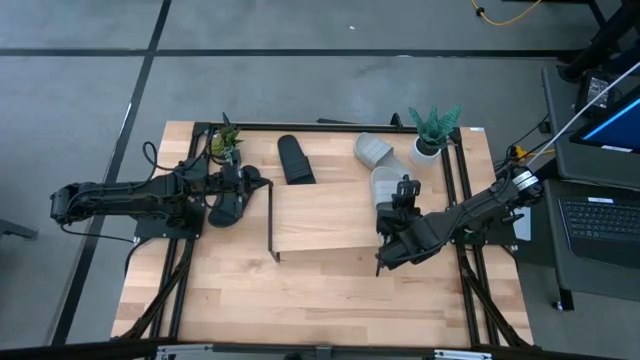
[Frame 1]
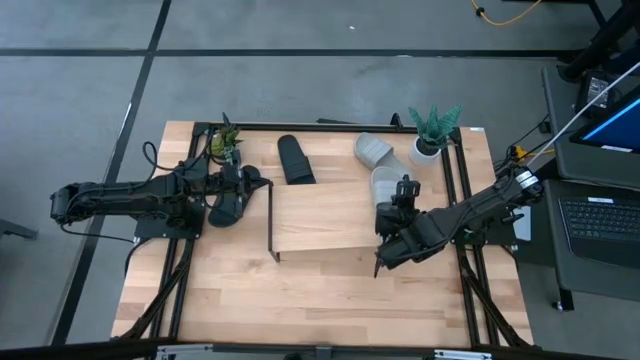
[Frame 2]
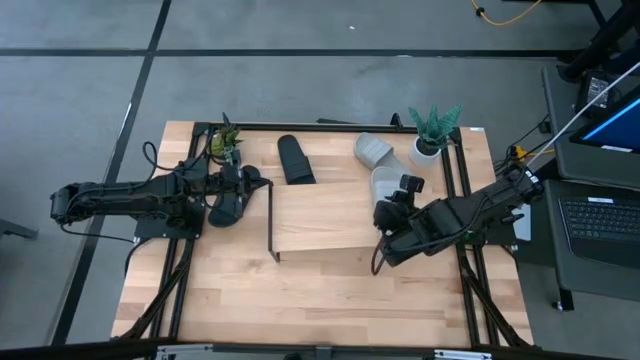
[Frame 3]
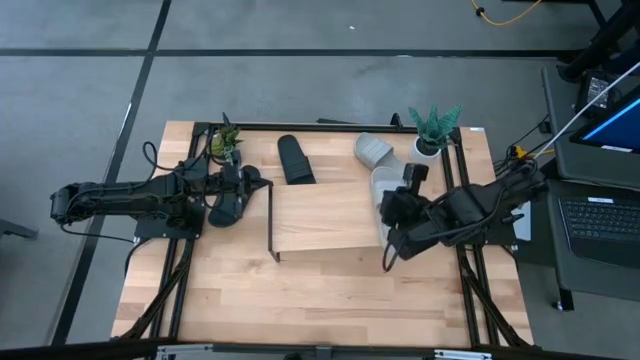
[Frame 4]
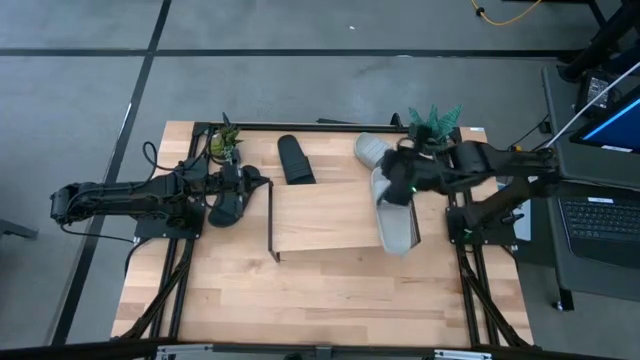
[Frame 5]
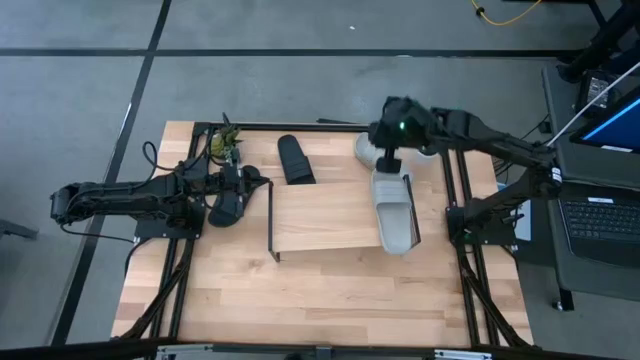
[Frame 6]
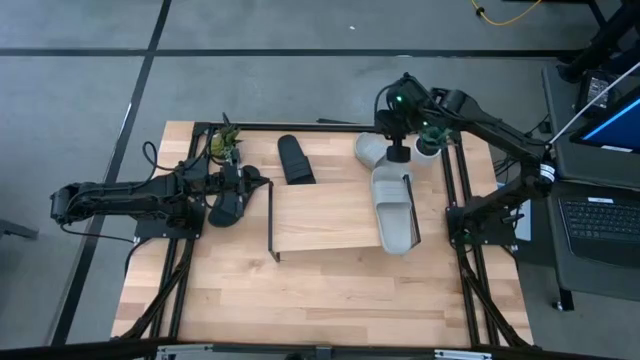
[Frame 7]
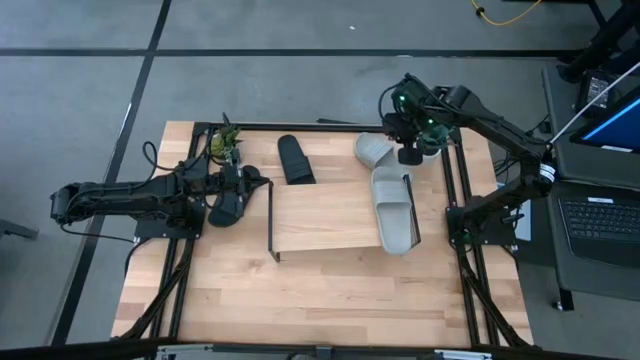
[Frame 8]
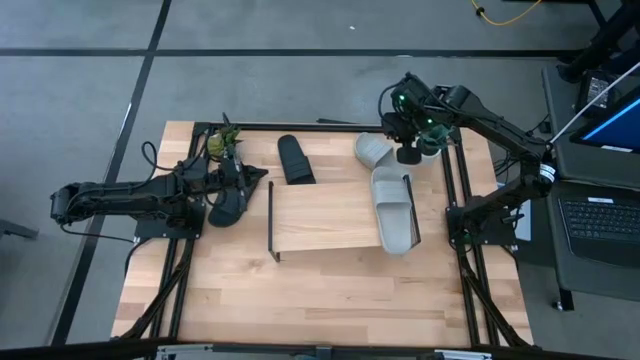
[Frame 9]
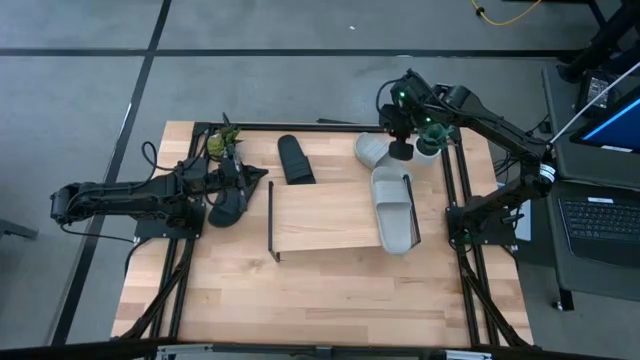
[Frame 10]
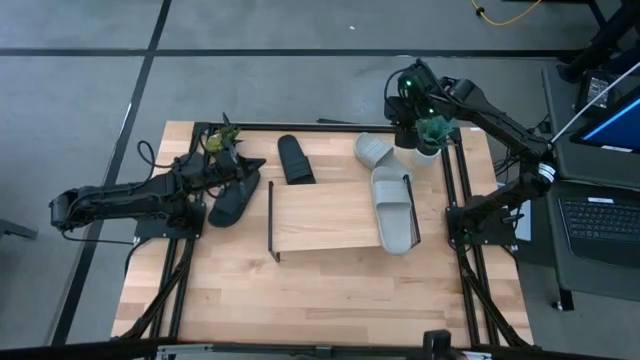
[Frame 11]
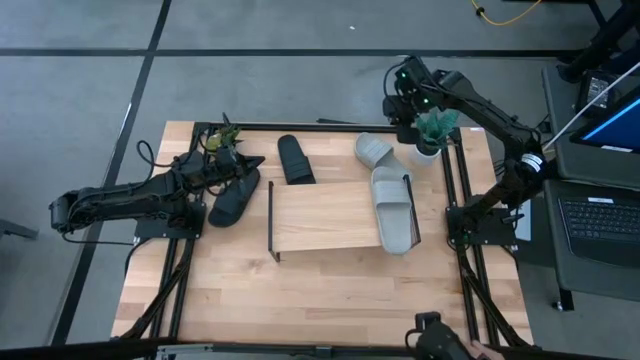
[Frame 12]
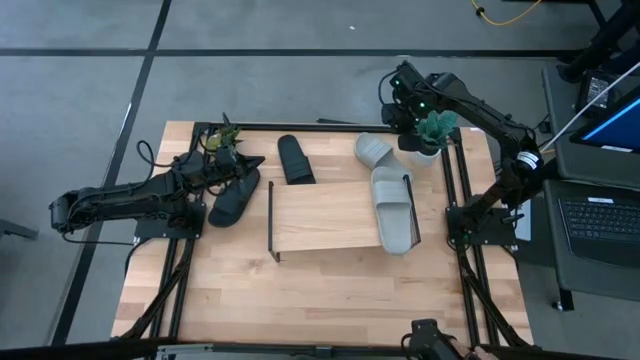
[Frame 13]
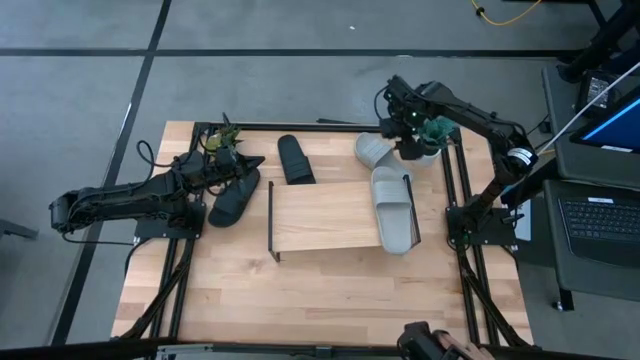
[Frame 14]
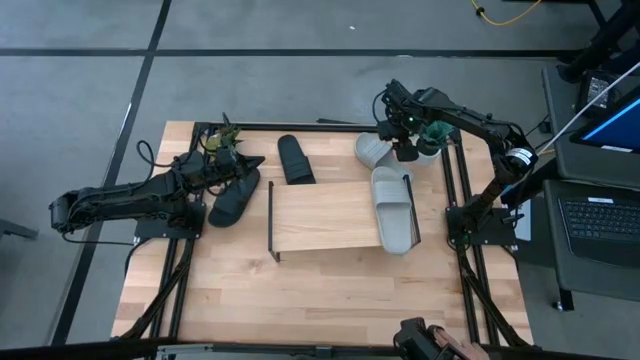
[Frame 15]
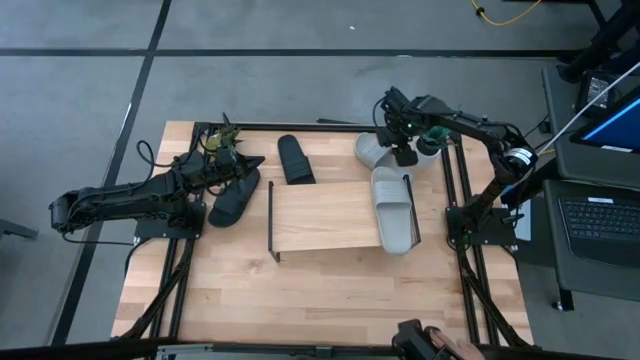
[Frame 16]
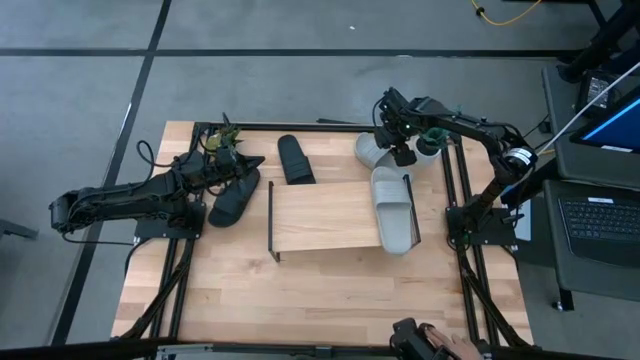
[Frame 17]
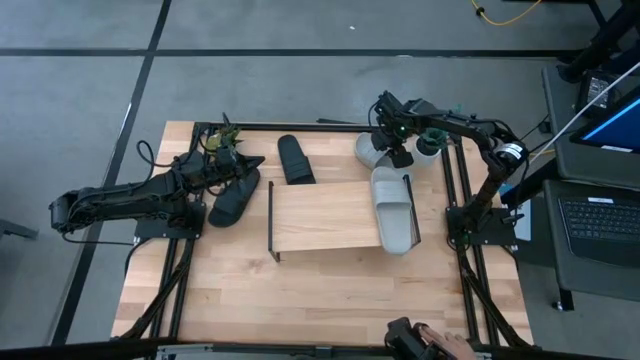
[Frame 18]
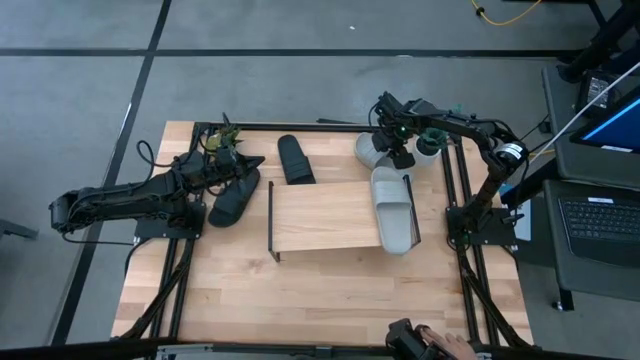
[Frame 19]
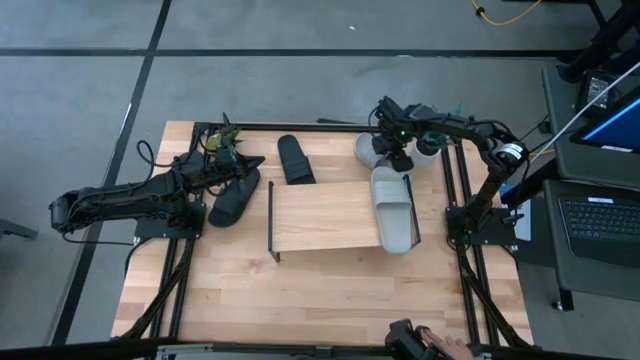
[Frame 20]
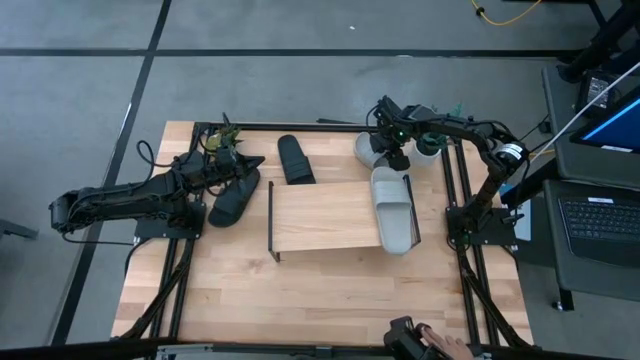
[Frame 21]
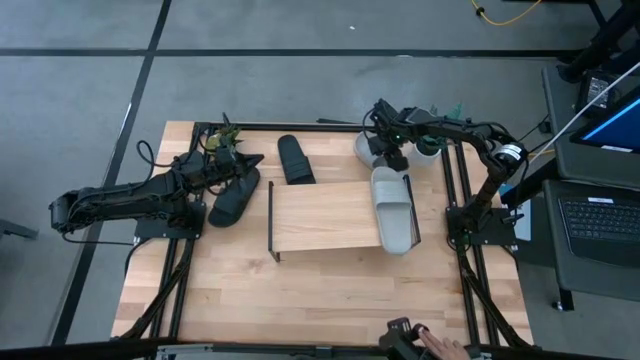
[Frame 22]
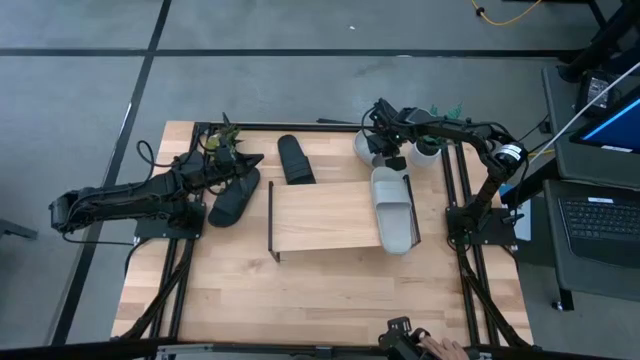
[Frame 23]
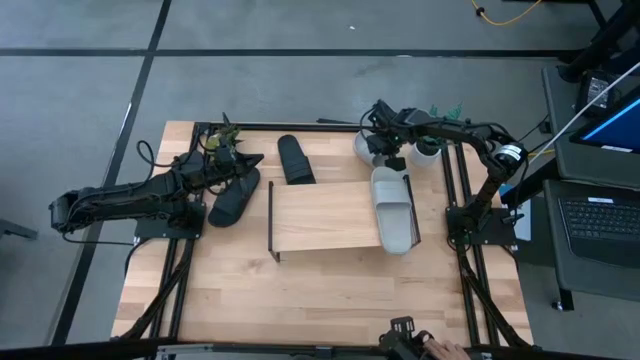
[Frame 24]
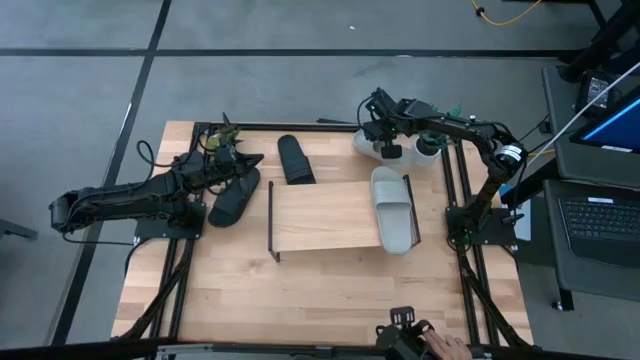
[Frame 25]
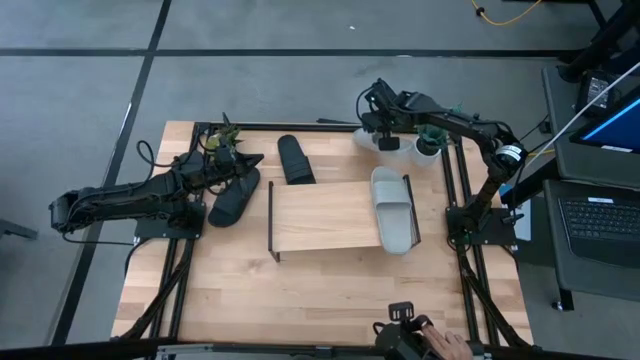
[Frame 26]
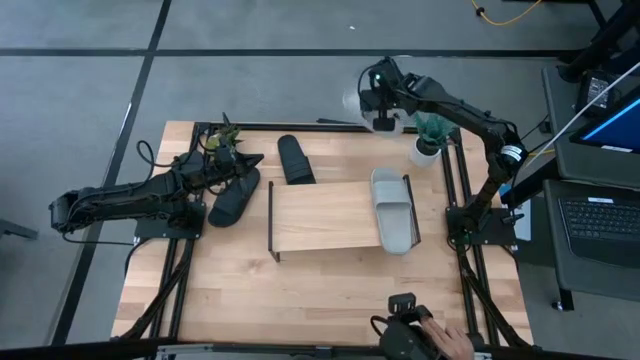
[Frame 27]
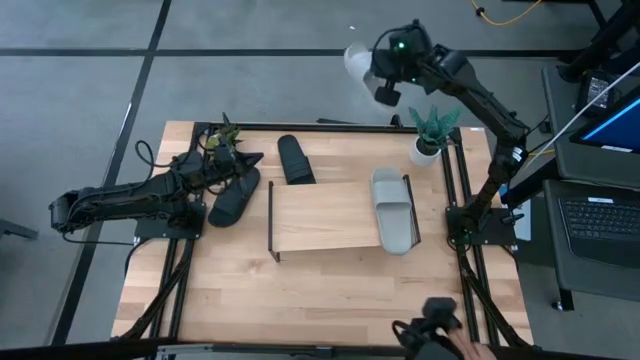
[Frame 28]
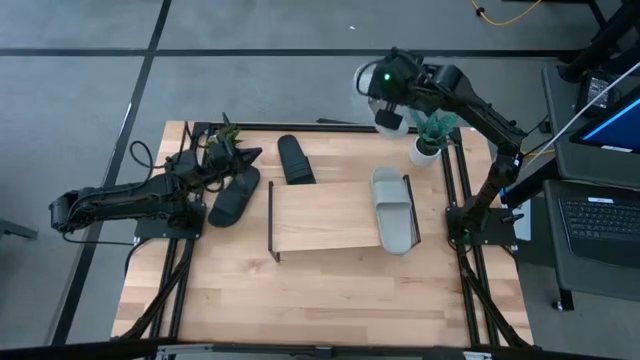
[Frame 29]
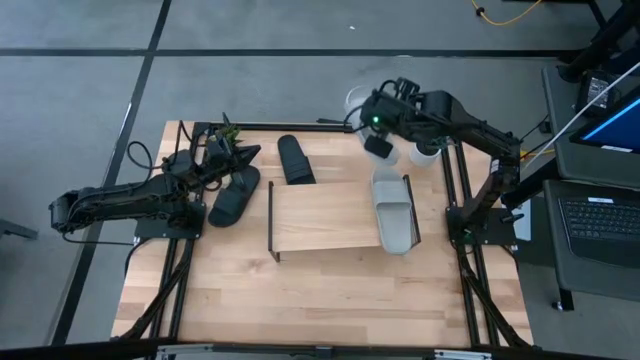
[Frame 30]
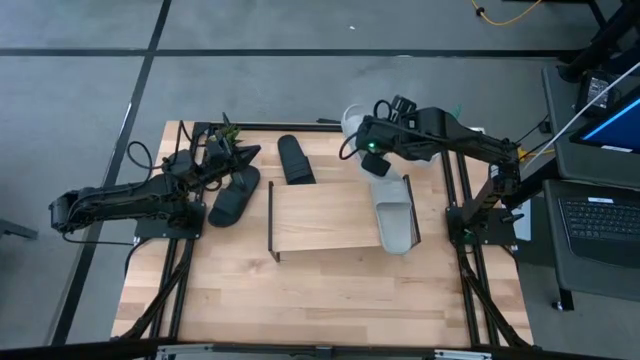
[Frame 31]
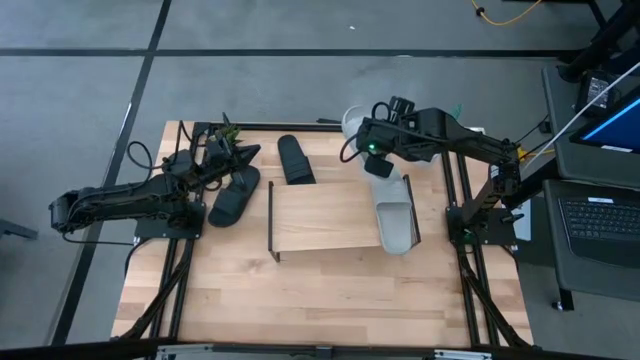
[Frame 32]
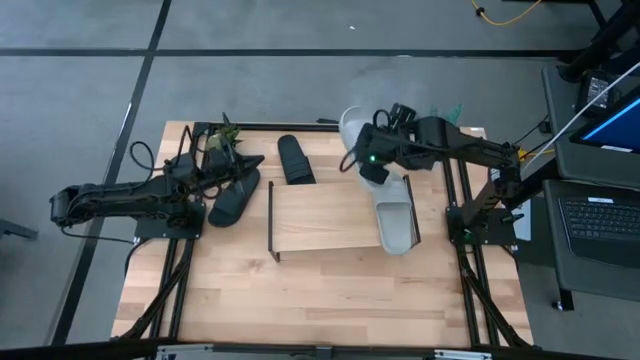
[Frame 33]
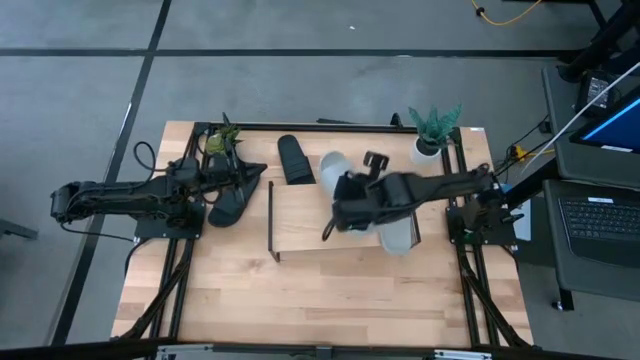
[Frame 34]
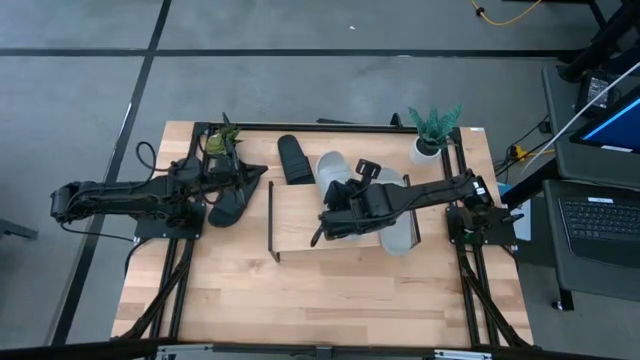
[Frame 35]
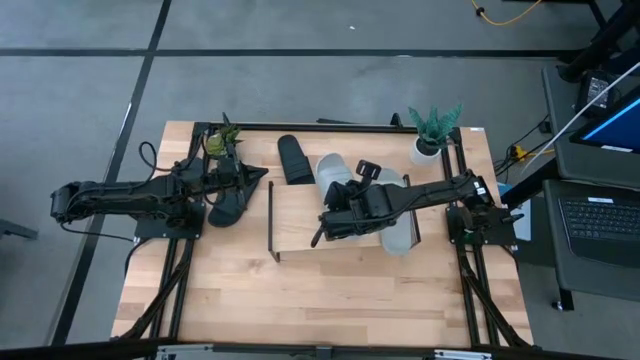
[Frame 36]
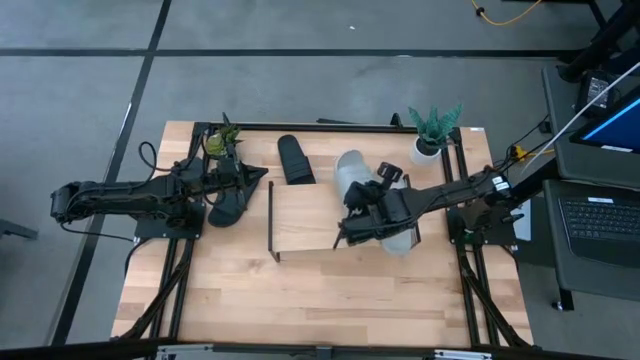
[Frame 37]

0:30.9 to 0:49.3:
Task: Pick and place slides into the shelf
Put the top gray slide on the shelf

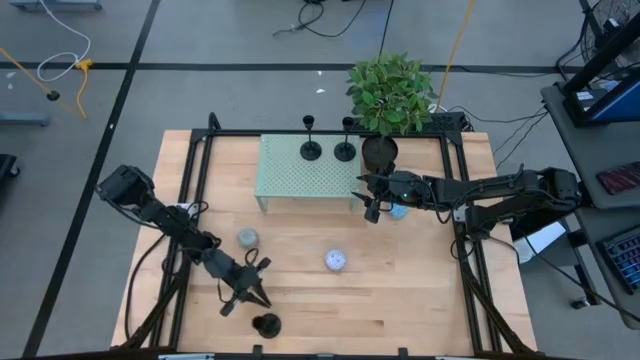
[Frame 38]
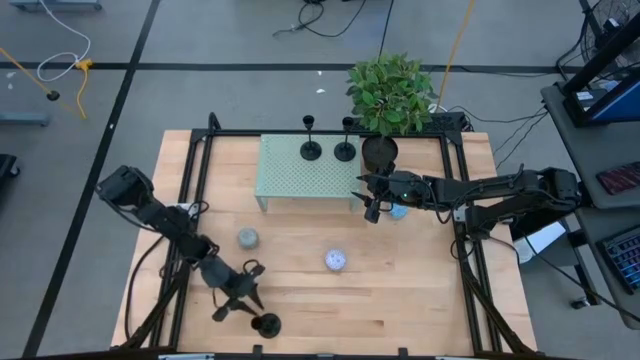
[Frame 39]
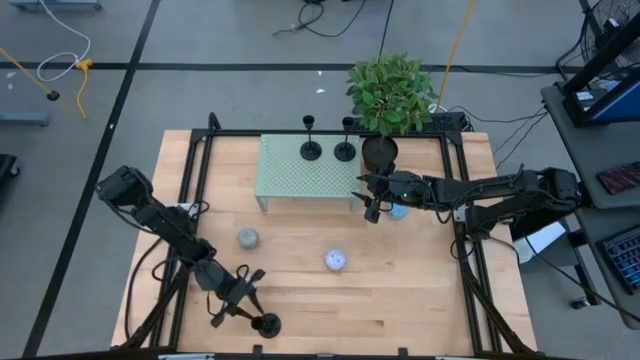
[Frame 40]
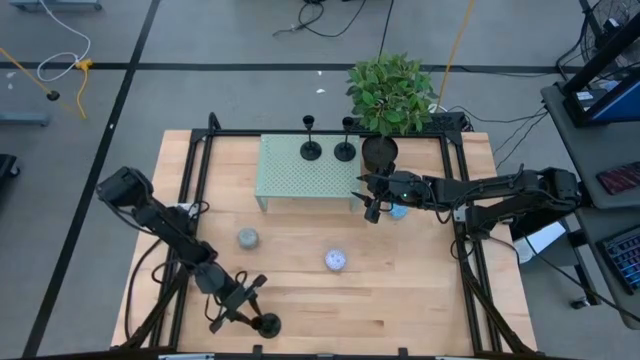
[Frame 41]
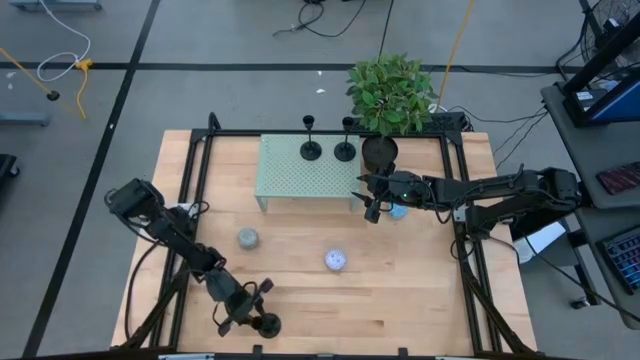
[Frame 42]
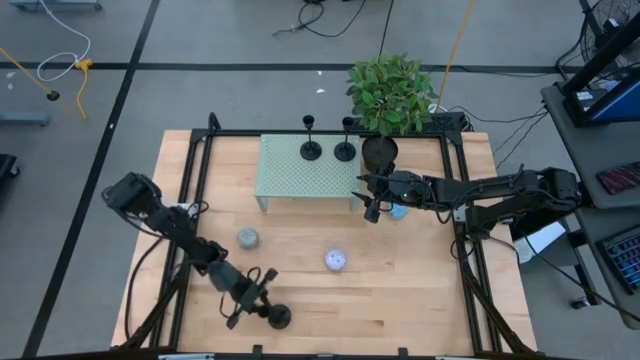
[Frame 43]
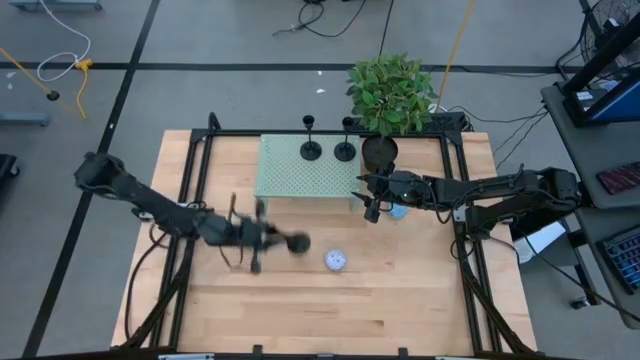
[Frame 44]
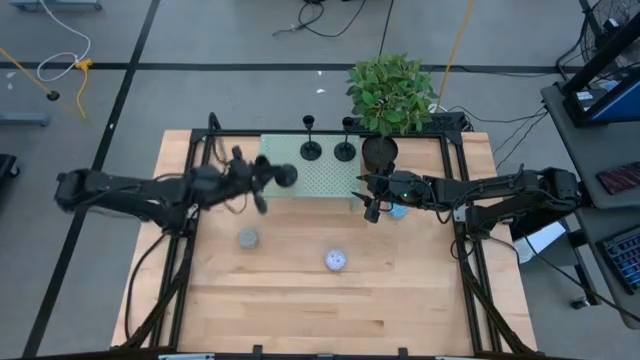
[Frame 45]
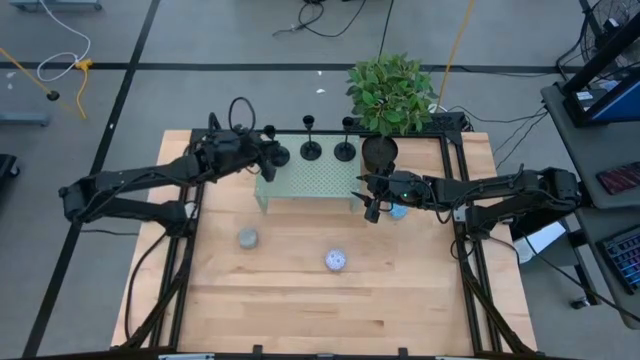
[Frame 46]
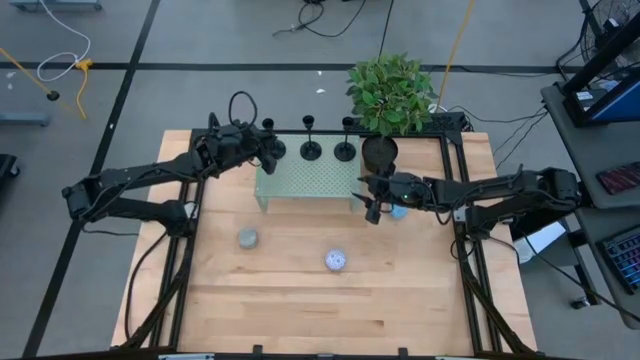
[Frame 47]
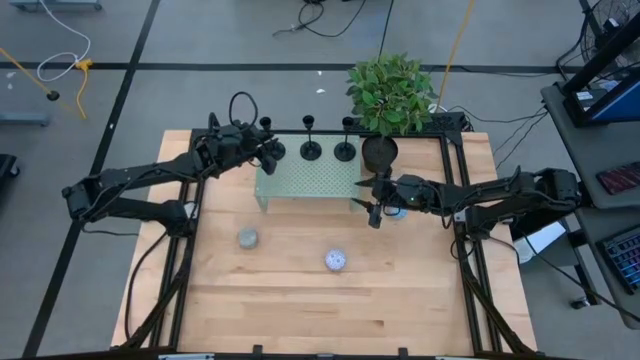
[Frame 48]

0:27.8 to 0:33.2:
Task: Pick & Place candle stick holders
Put the black candle holder on the shelf aligned with the other black candle holders
